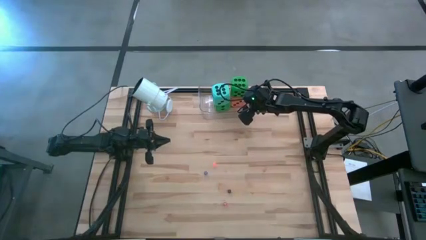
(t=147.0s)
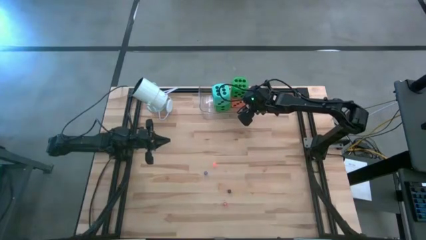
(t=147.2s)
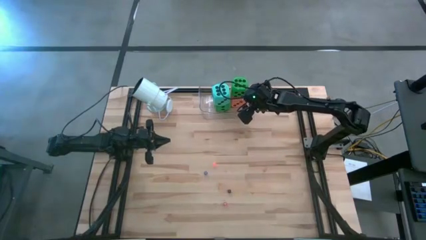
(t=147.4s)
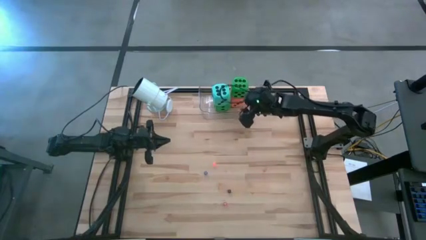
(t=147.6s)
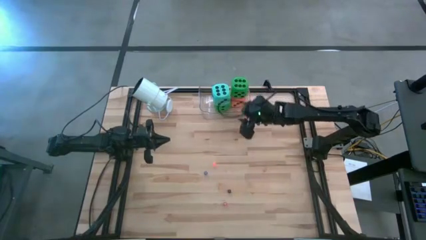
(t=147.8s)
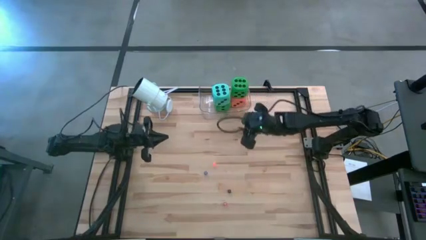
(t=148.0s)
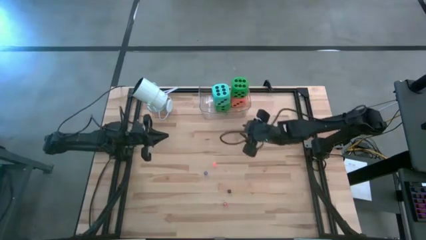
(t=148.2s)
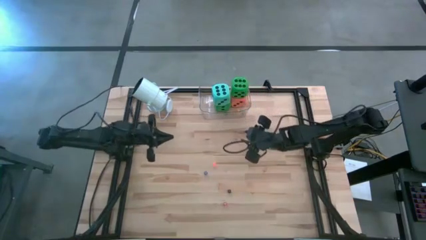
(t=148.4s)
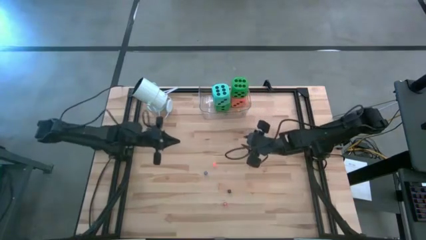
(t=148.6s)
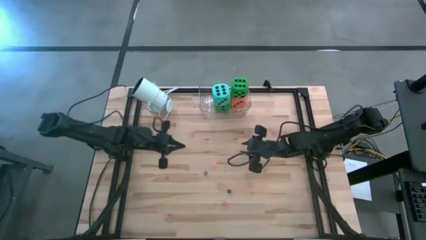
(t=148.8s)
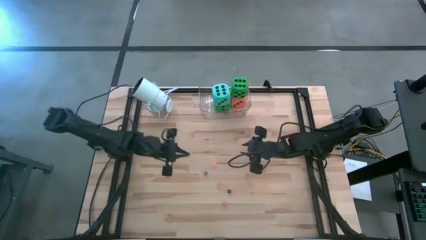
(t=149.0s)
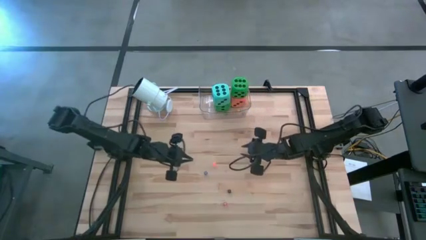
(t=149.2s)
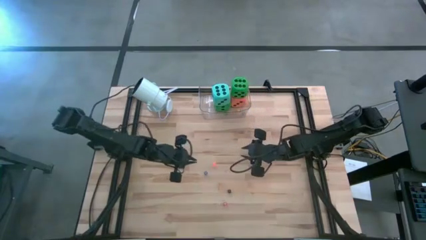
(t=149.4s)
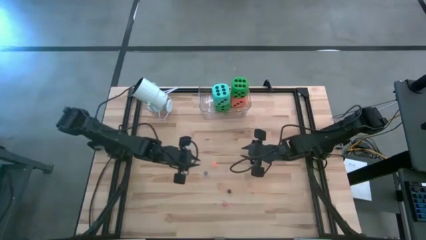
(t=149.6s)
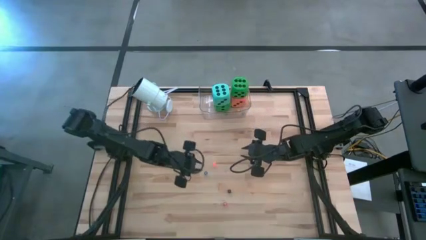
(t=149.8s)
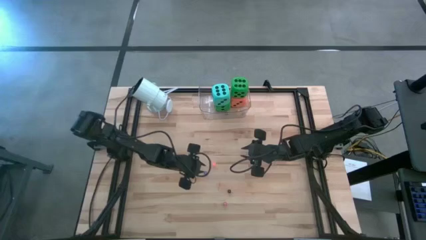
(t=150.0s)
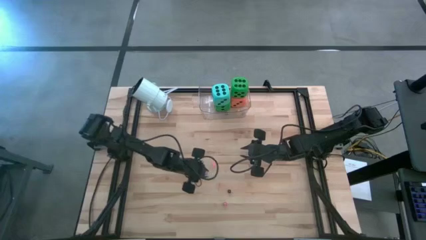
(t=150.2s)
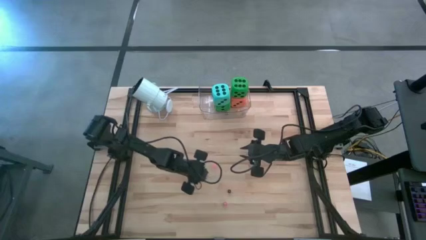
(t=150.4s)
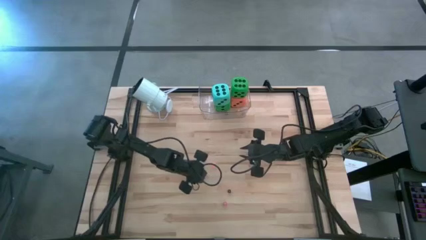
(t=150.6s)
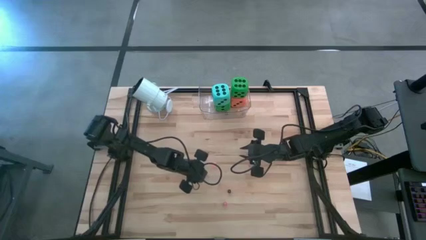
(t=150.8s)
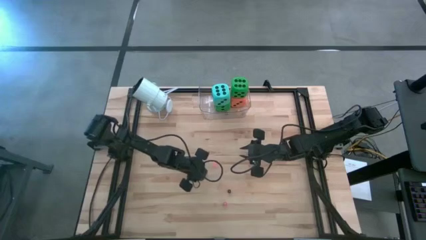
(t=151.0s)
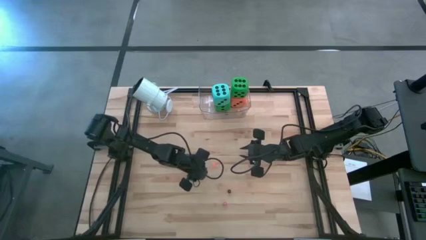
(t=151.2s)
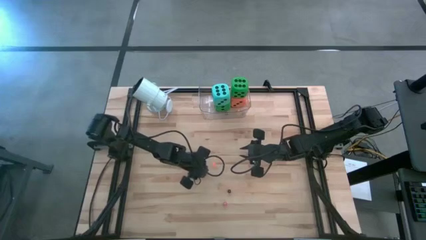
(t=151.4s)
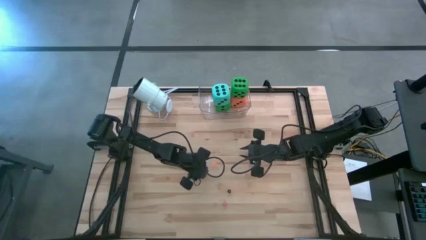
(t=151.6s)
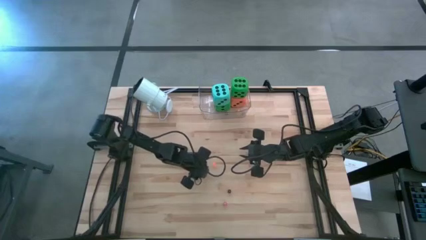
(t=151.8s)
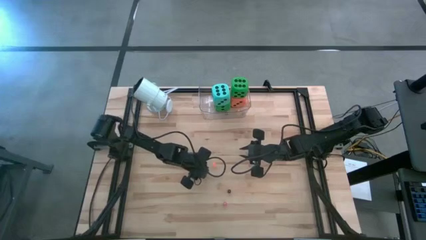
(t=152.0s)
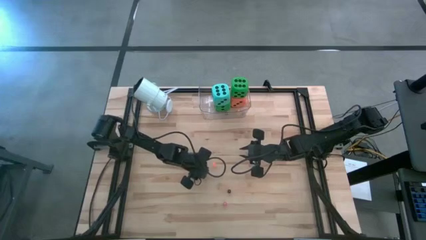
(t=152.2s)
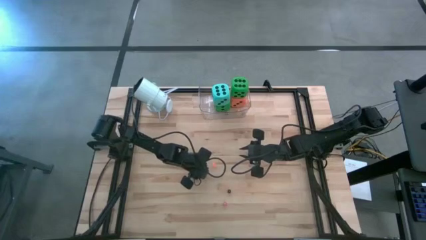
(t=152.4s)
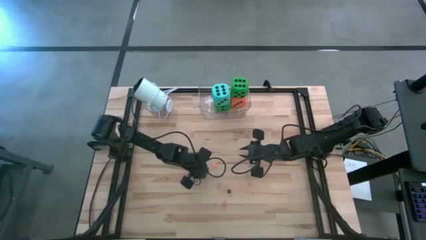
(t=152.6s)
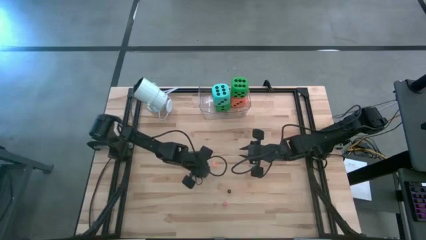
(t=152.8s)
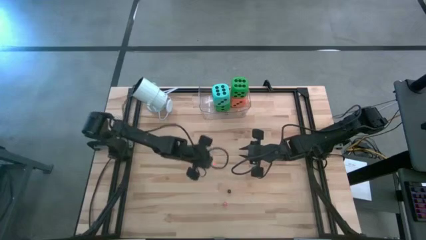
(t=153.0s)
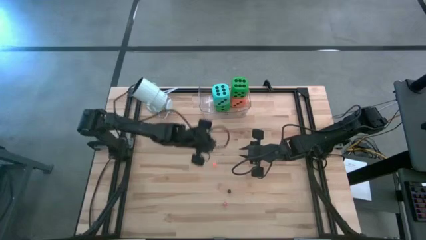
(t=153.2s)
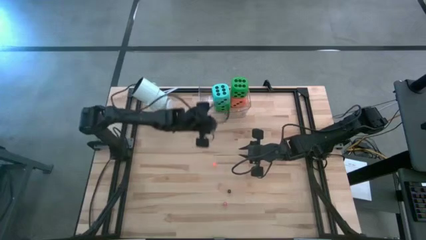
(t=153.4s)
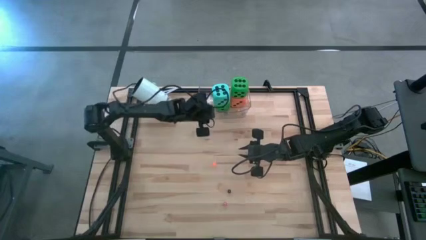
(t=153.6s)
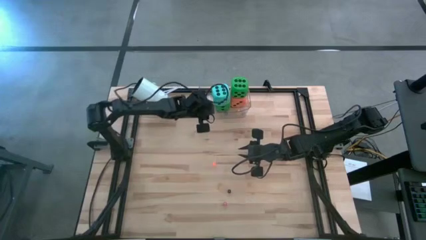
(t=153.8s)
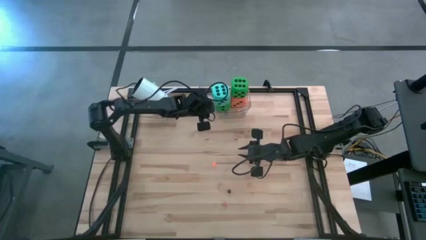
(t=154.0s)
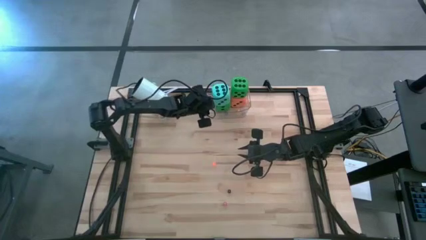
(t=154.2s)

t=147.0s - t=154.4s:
Task: Pick & Place Dice
Put the small blue dice into the transparent bin

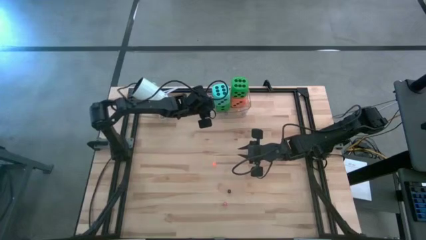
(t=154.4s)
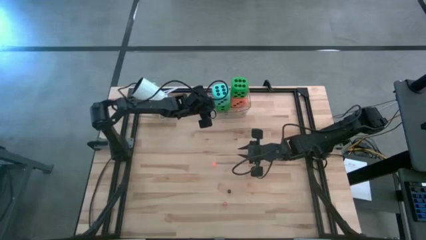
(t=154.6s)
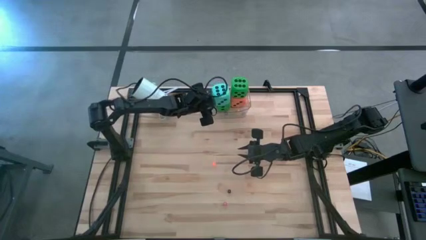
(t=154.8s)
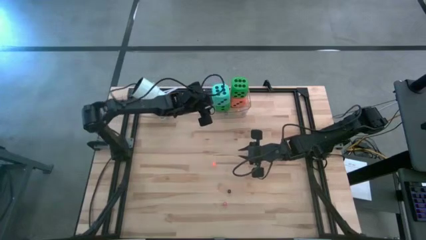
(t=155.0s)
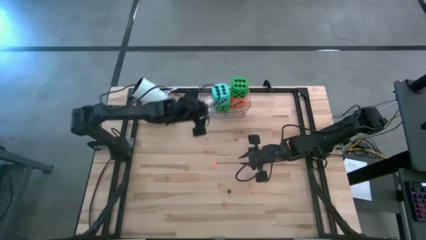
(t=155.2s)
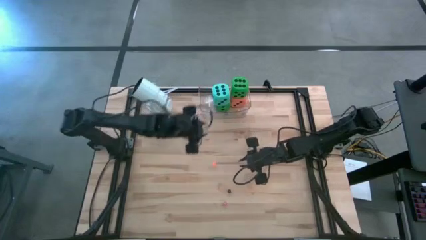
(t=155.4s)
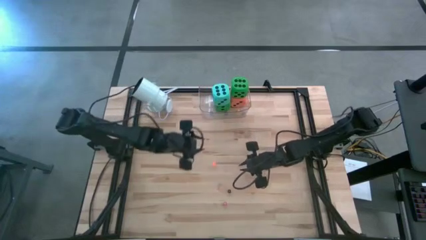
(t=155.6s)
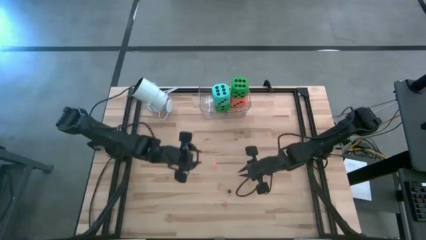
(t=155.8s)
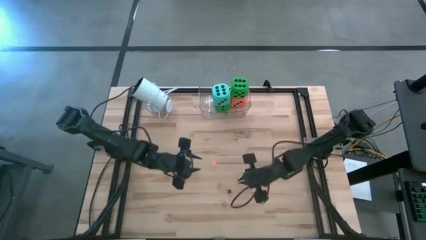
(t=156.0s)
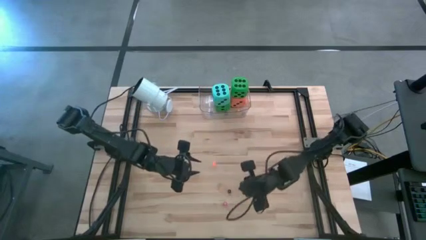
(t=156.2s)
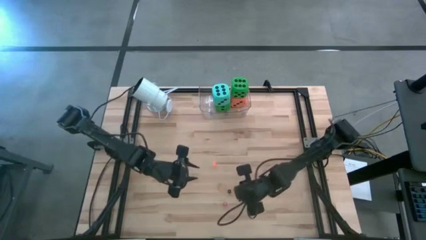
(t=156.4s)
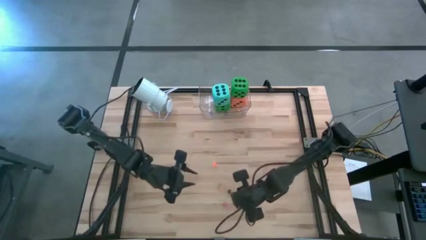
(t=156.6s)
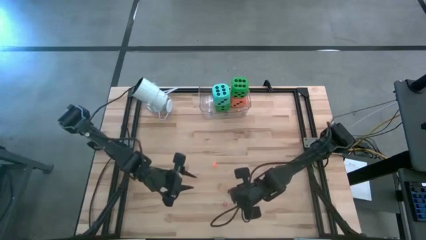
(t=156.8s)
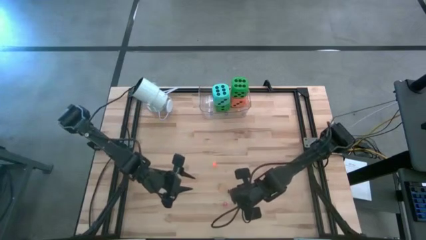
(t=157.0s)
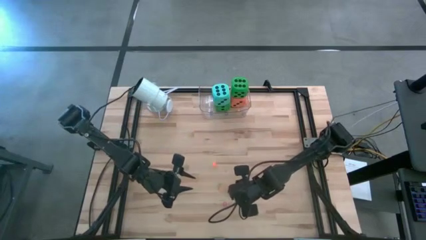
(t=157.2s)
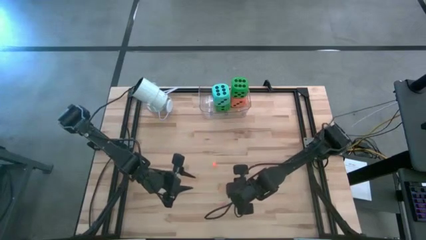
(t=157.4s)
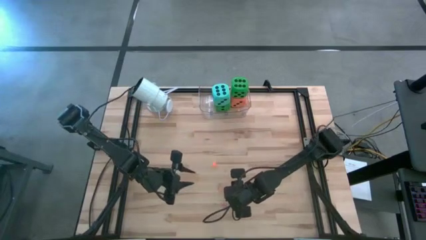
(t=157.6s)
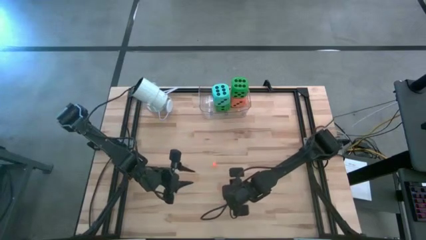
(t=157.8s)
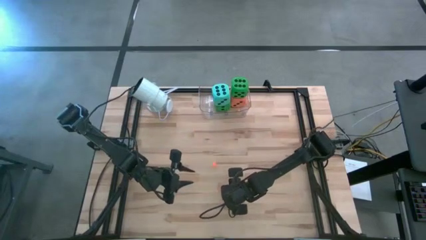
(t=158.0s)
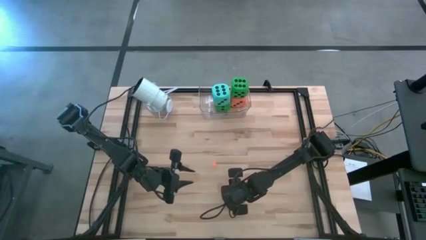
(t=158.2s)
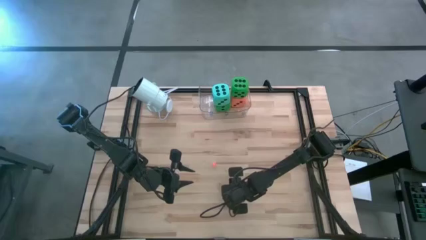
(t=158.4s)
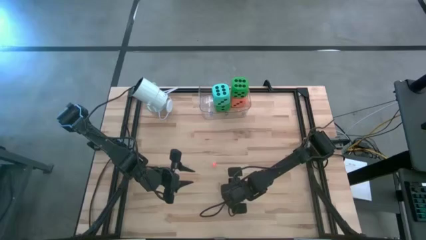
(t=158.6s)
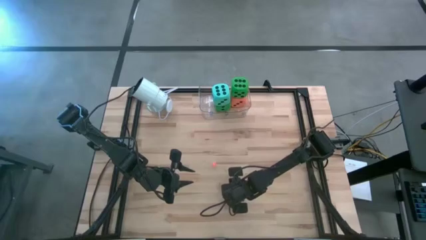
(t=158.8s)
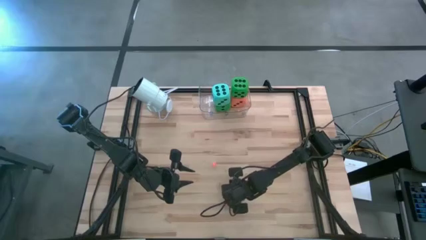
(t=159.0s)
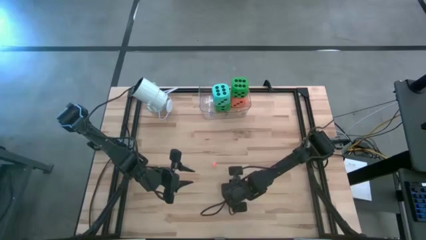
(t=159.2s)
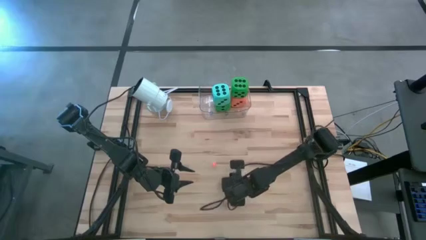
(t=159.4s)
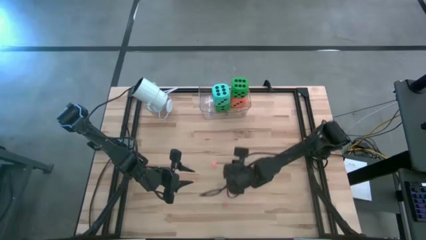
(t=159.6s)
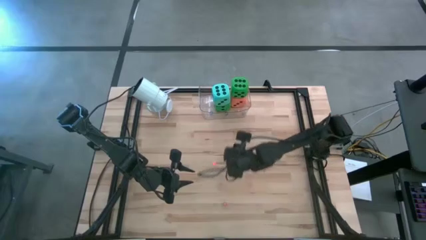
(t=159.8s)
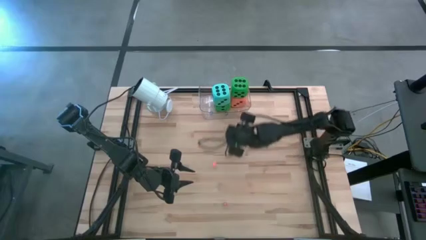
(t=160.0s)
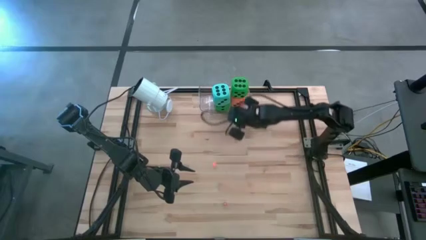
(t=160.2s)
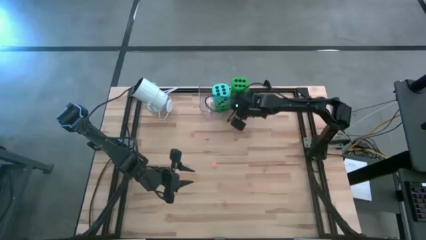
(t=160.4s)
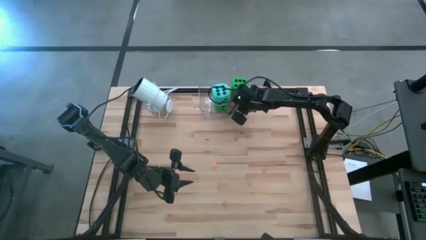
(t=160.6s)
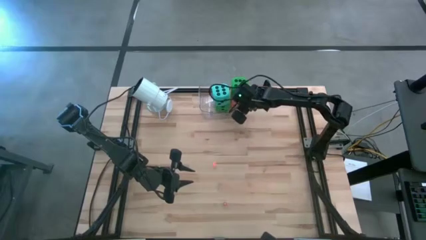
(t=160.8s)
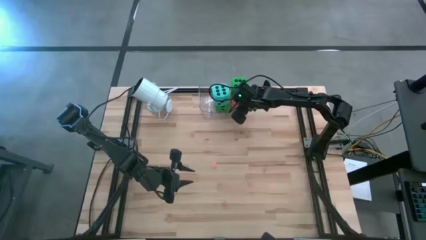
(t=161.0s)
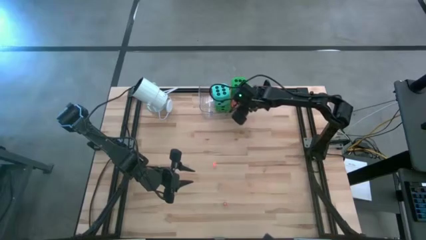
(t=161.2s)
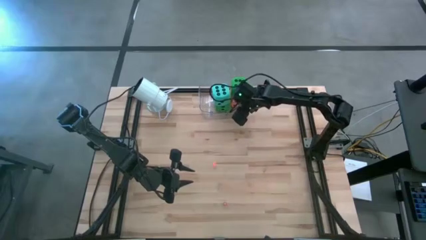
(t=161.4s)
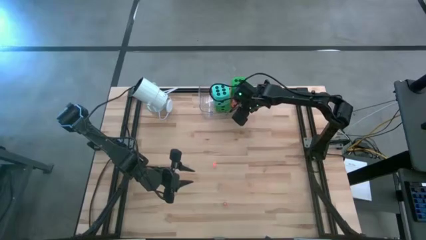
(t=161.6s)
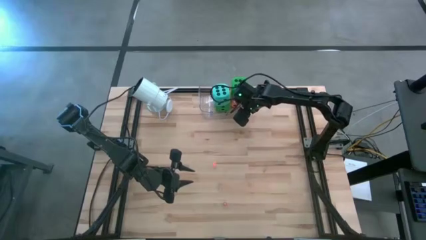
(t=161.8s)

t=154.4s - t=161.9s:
Put the small black dice into the transparent bin
